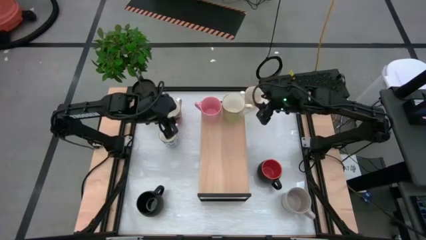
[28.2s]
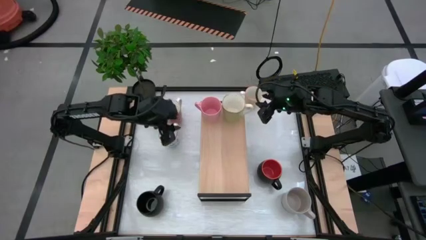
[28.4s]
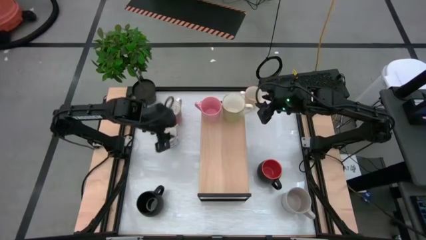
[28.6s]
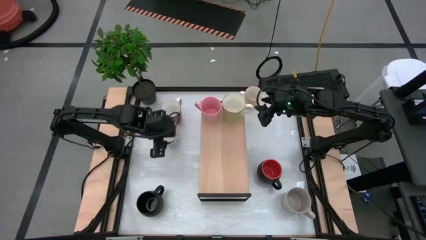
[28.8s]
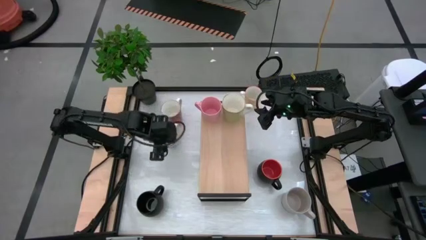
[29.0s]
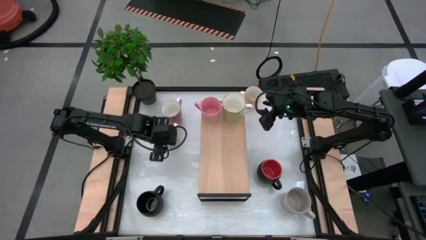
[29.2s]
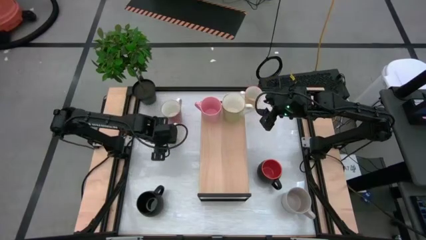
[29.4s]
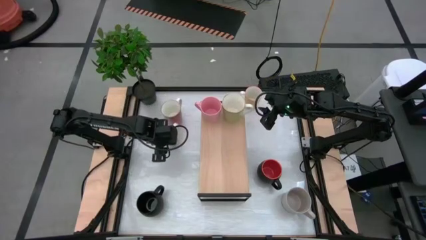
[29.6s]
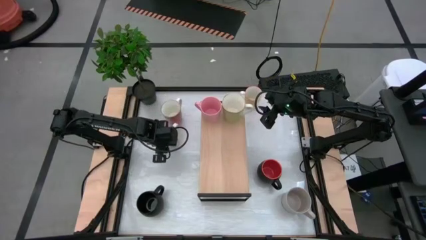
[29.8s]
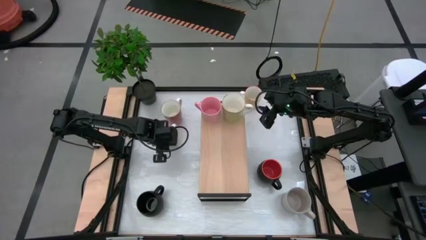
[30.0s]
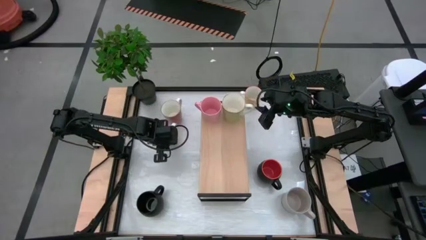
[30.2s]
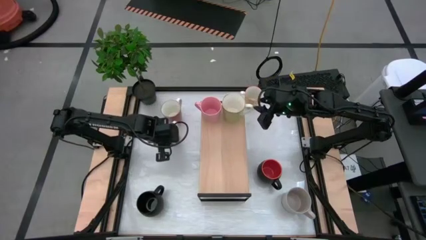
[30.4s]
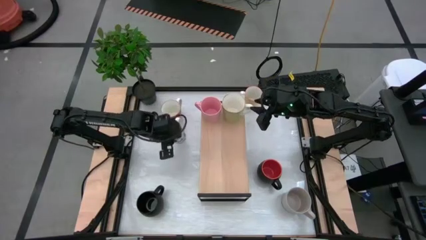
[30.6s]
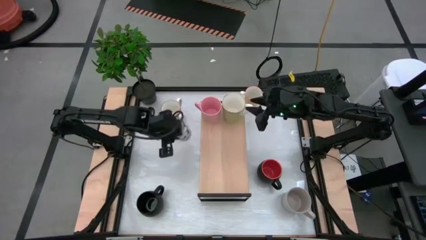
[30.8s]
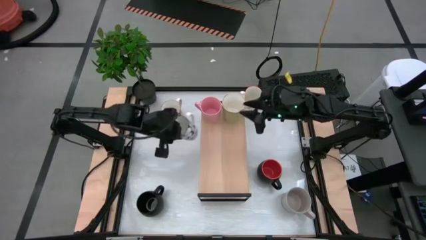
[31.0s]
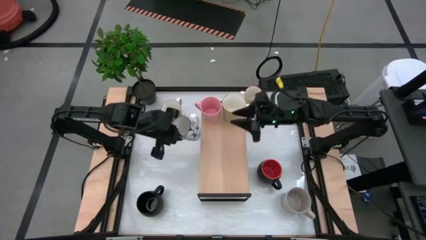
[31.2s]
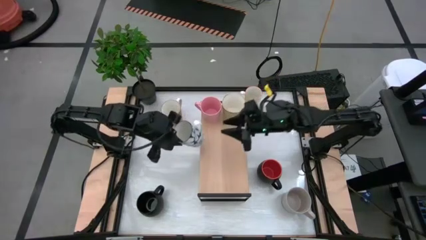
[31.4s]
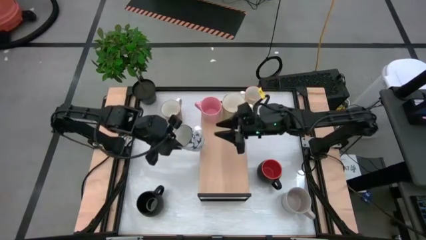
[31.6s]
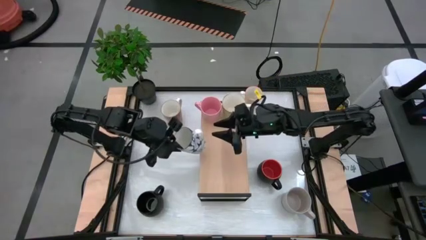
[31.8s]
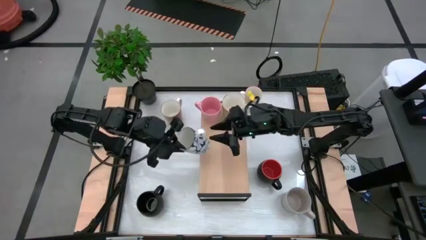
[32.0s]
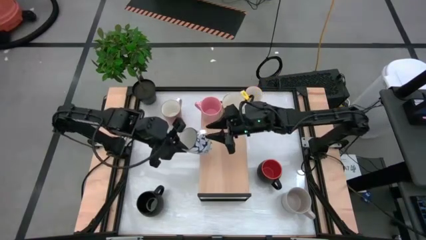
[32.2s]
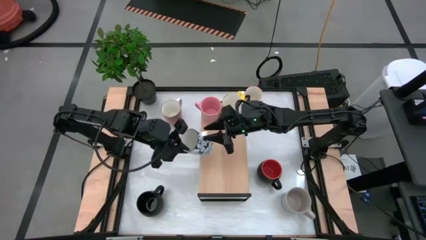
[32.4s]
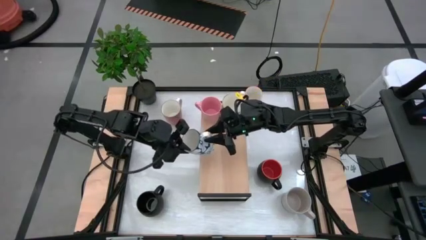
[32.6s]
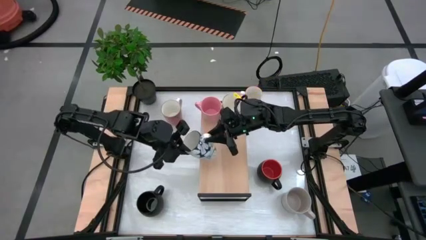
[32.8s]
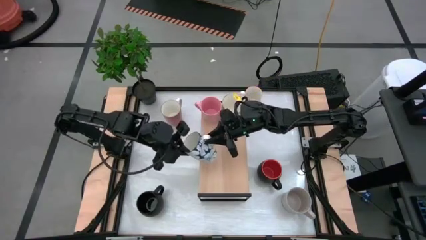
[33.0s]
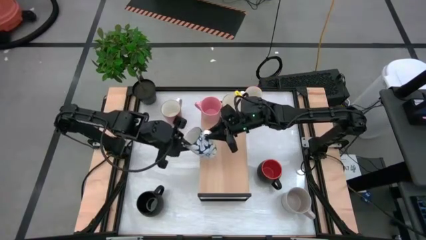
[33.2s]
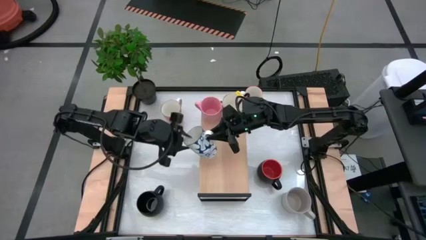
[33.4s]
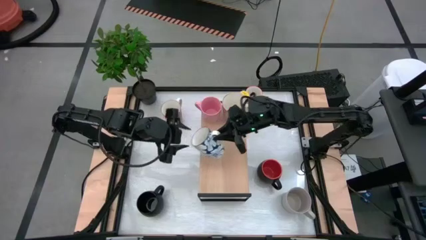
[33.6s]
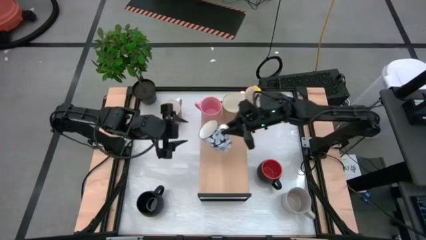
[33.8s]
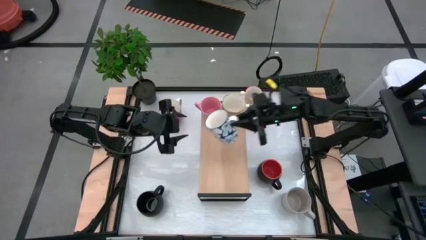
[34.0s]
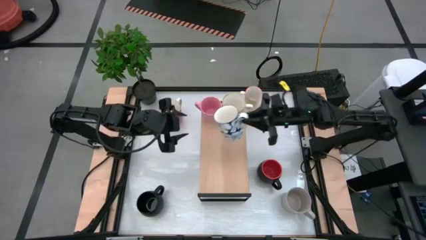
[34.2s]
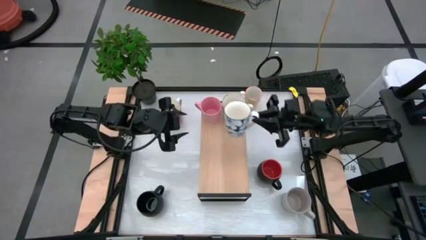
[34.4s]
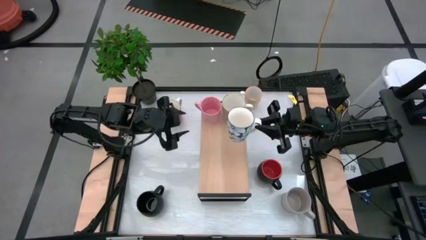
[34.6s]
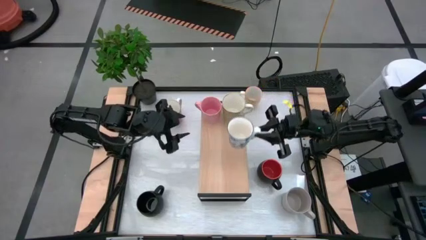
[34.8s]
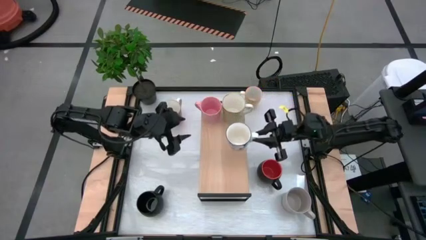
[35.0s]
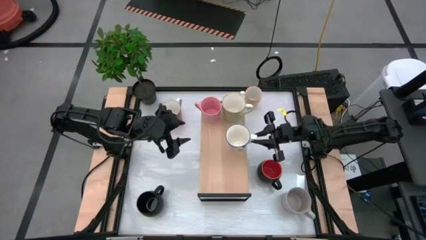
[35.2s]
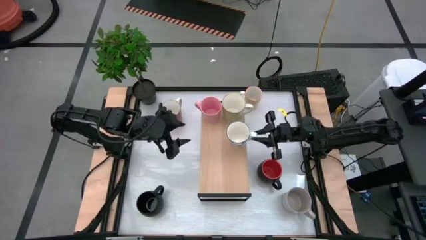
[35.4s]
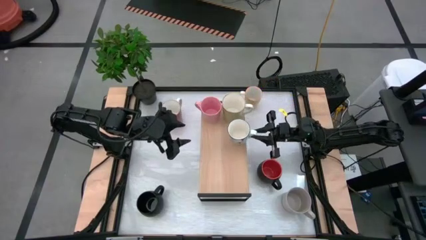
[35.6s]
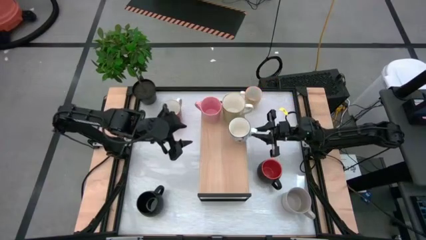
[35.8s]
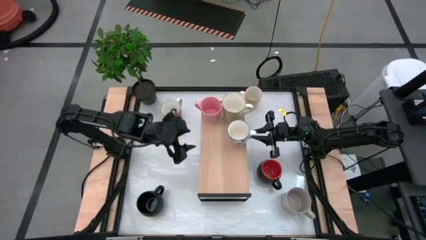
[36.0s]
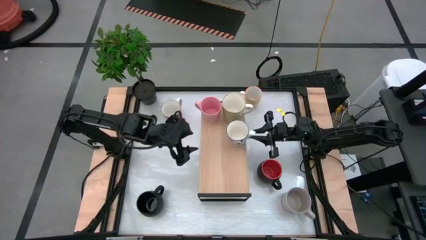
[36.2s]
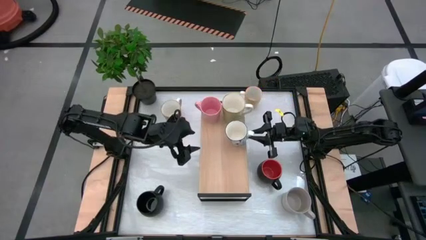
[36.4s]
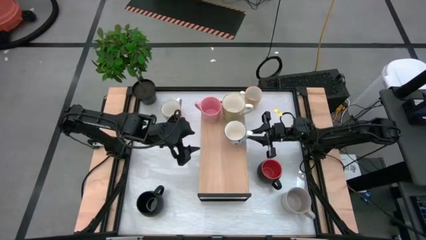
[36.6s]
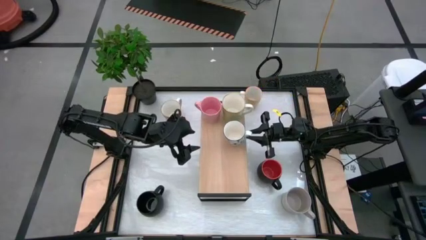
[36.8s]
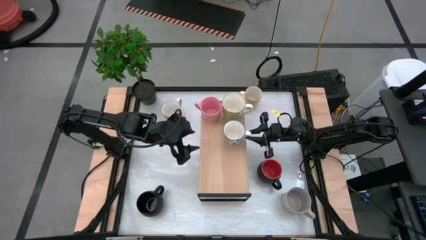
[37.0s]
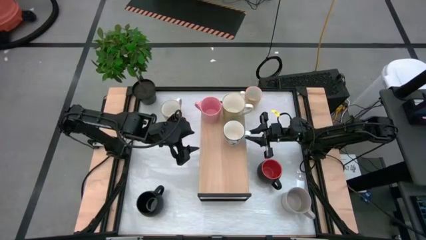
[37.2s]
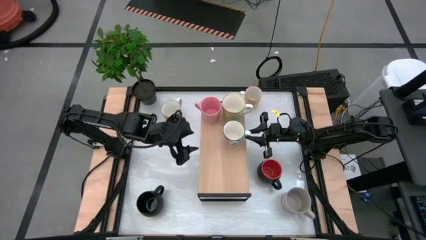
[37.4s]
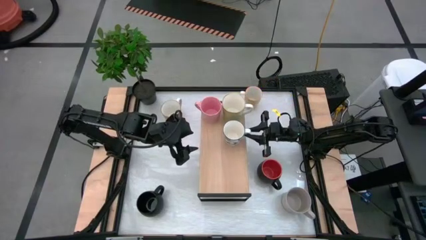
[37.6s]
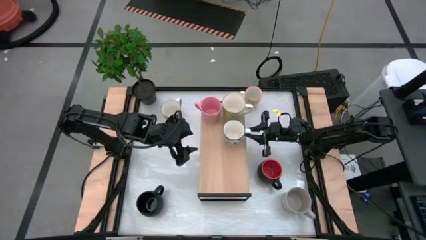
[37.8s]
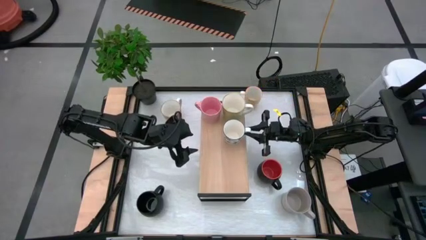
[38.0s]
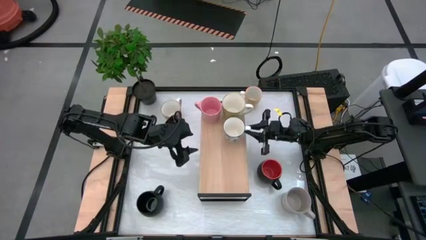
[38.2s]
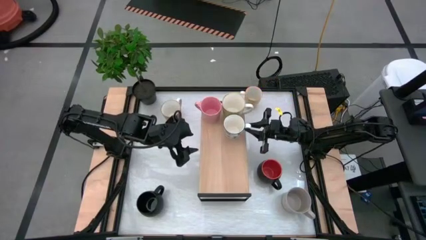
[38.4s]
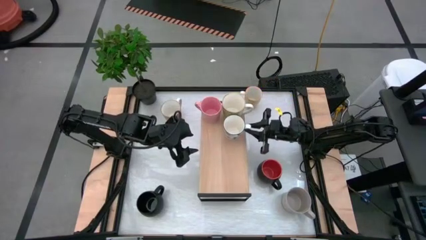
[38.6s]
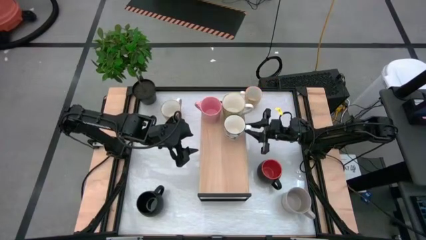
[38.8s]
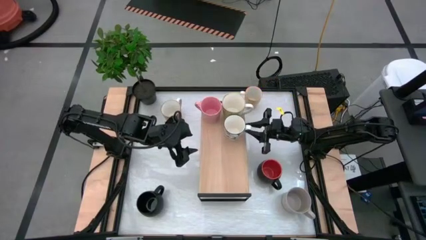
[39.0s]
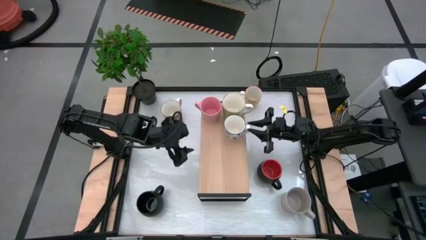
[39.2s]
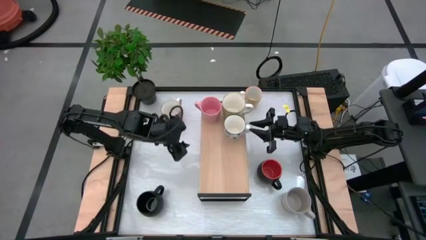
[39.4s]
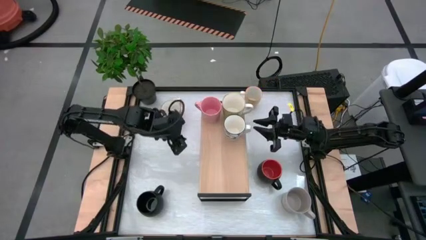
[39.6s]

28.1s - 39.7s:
Task: Place coffee mugs
Put the blue-white mug on the shelf
